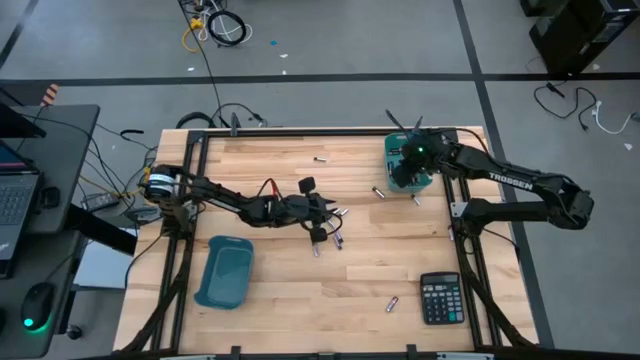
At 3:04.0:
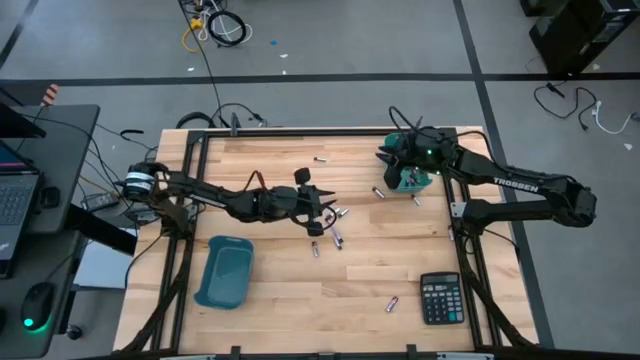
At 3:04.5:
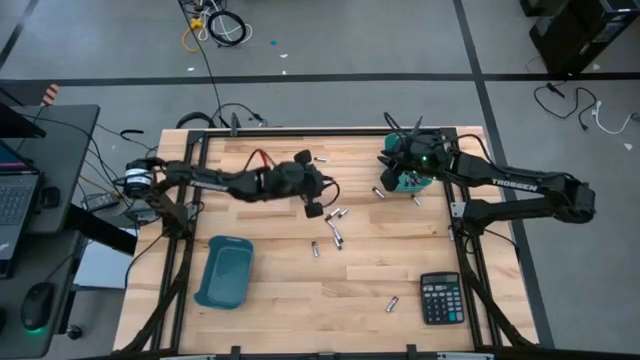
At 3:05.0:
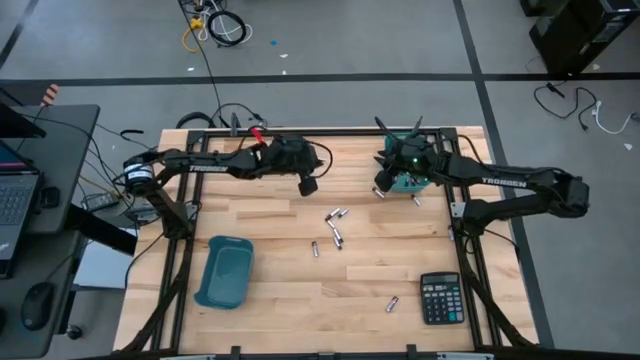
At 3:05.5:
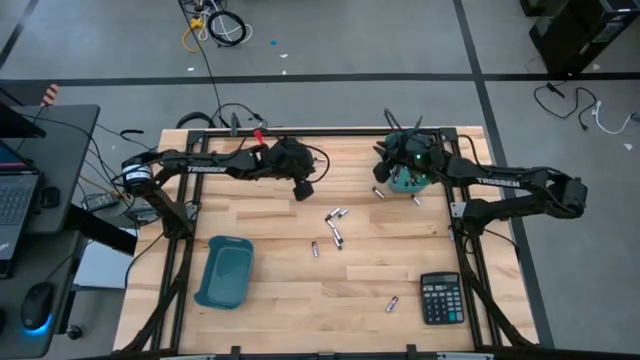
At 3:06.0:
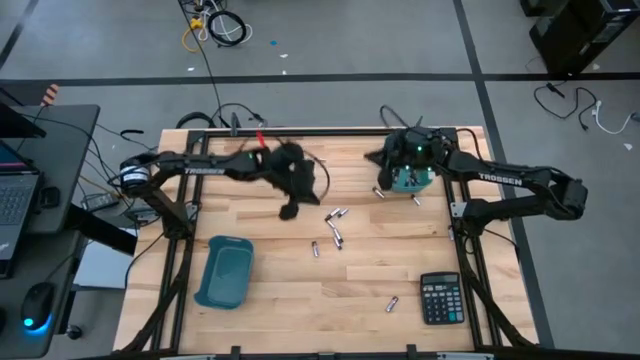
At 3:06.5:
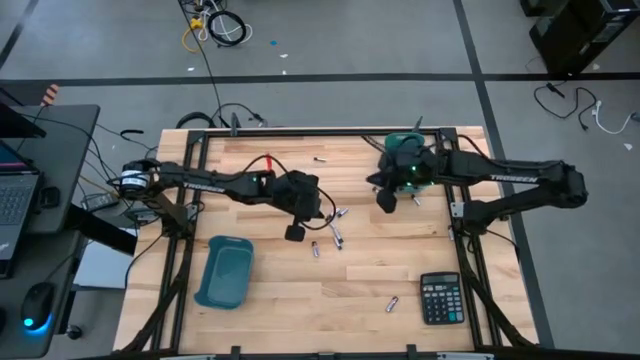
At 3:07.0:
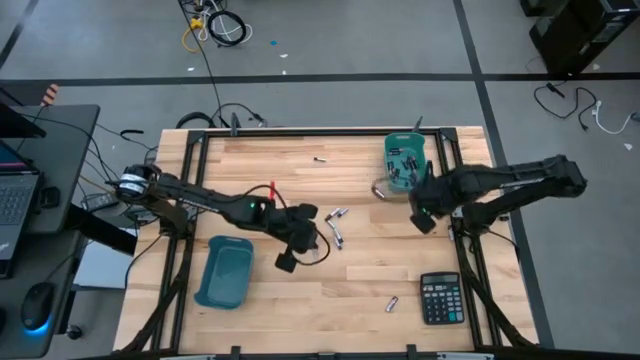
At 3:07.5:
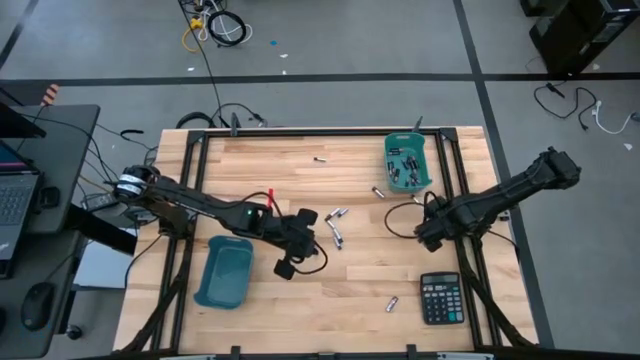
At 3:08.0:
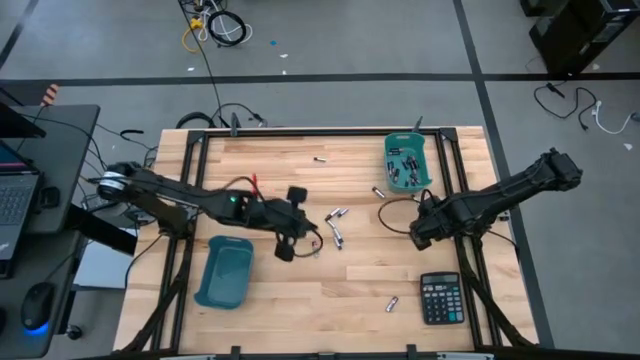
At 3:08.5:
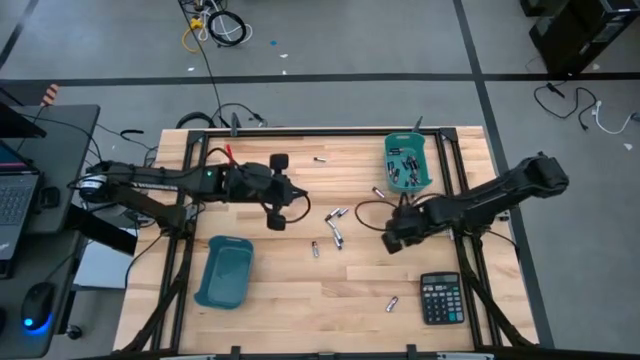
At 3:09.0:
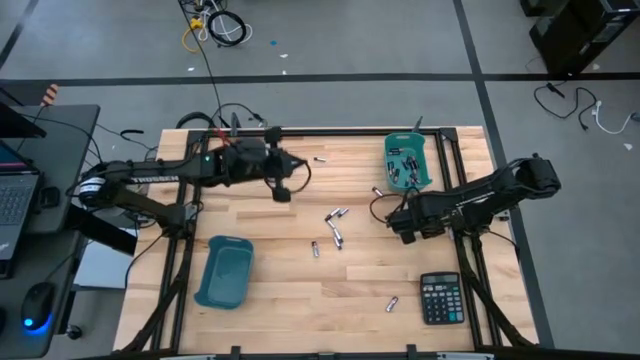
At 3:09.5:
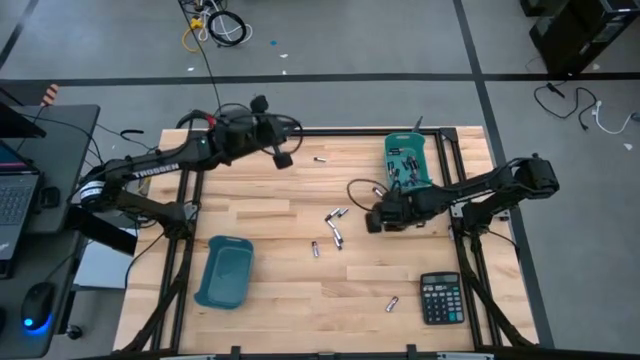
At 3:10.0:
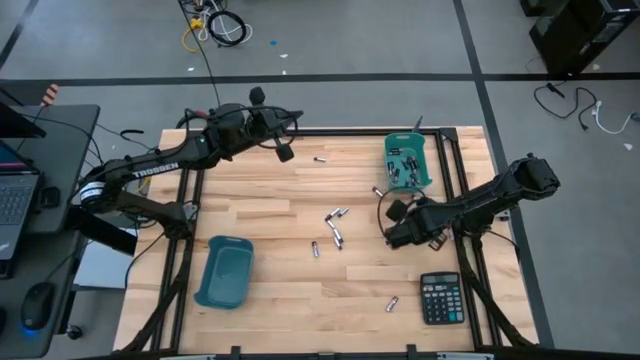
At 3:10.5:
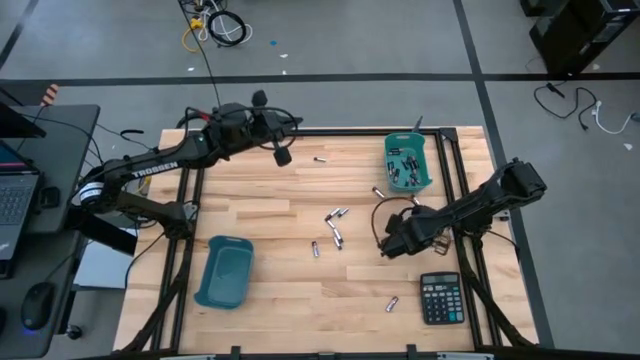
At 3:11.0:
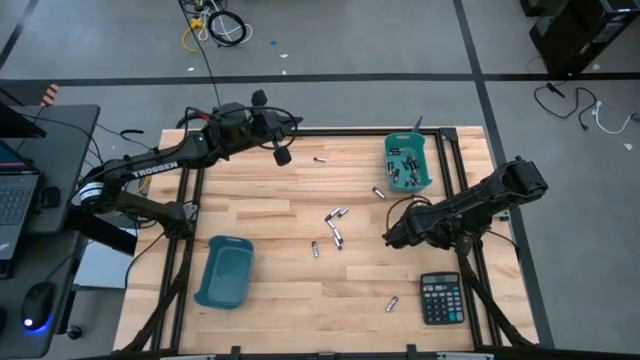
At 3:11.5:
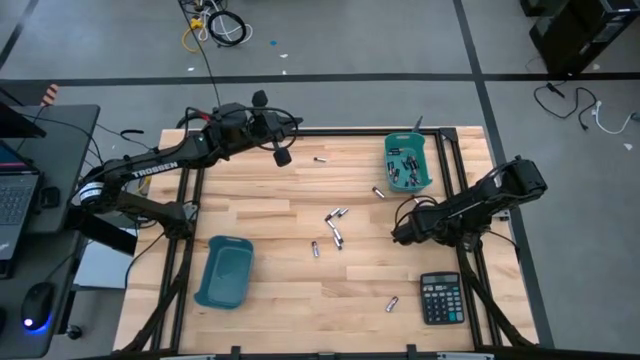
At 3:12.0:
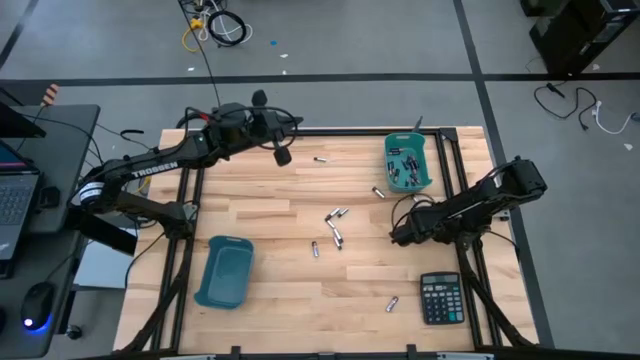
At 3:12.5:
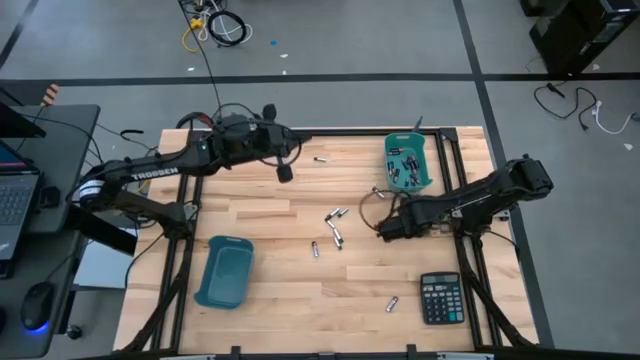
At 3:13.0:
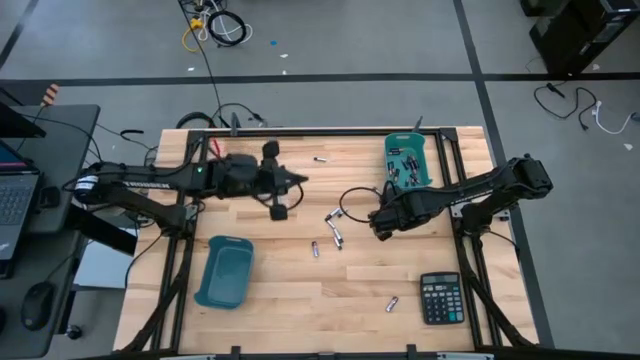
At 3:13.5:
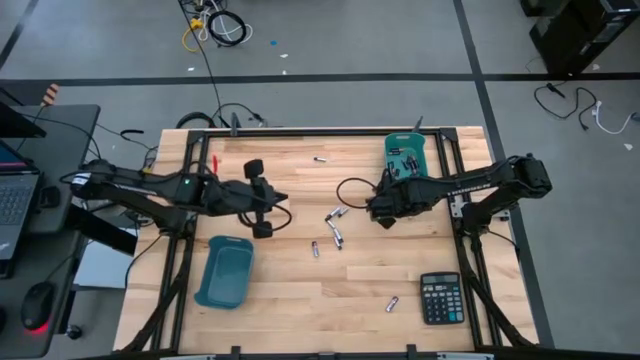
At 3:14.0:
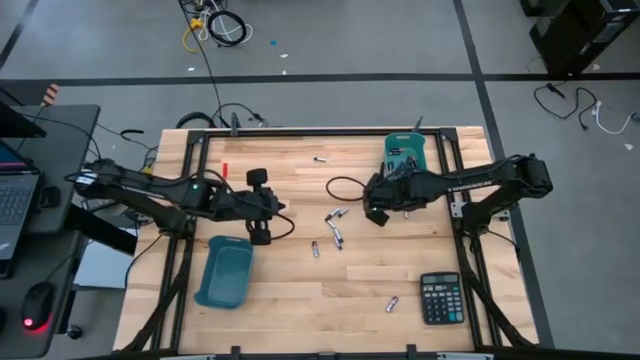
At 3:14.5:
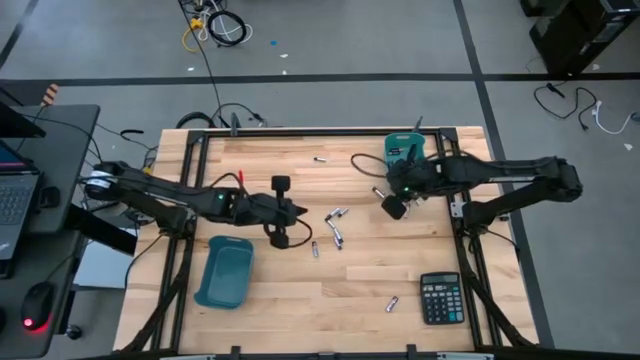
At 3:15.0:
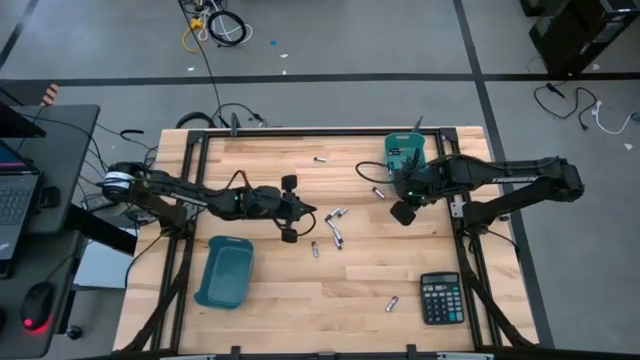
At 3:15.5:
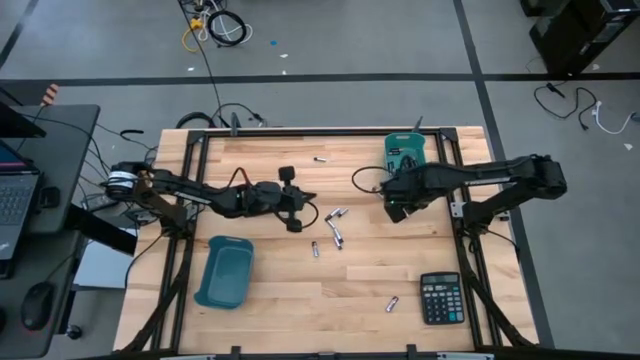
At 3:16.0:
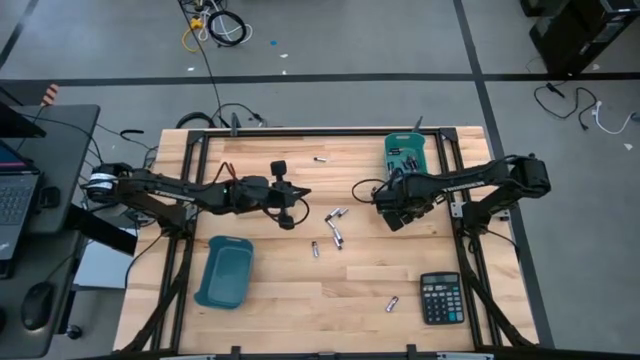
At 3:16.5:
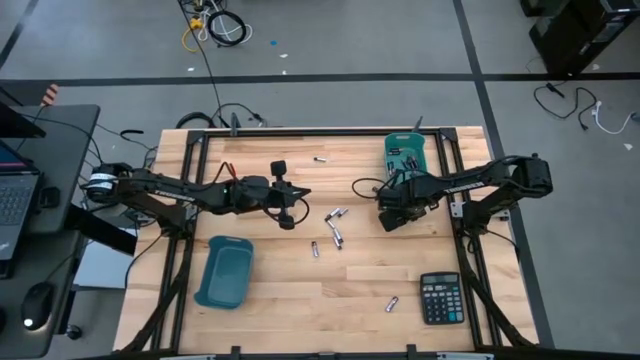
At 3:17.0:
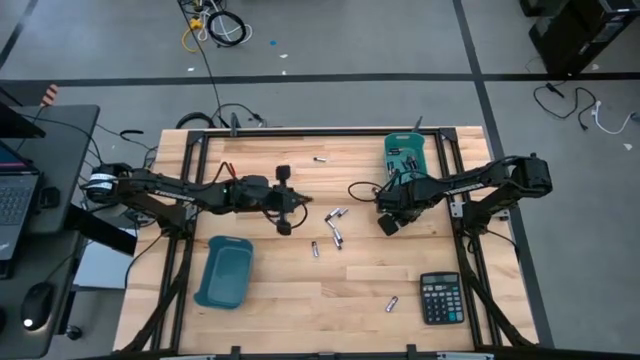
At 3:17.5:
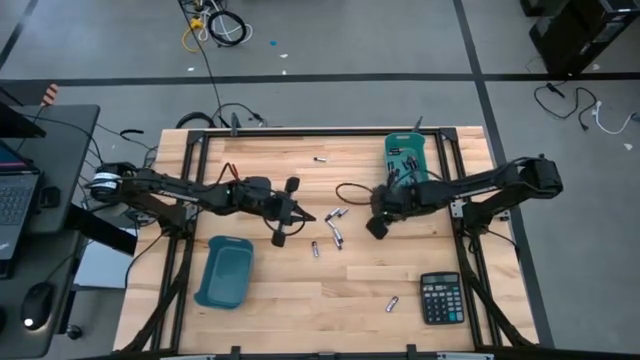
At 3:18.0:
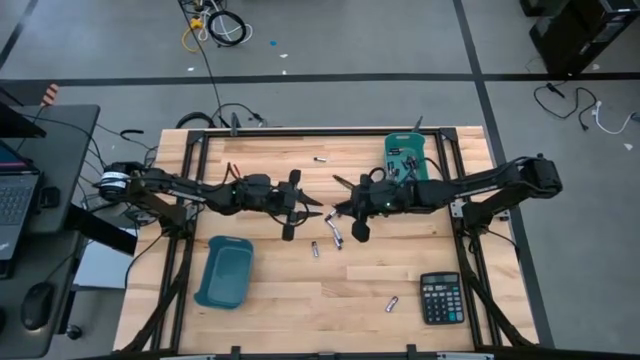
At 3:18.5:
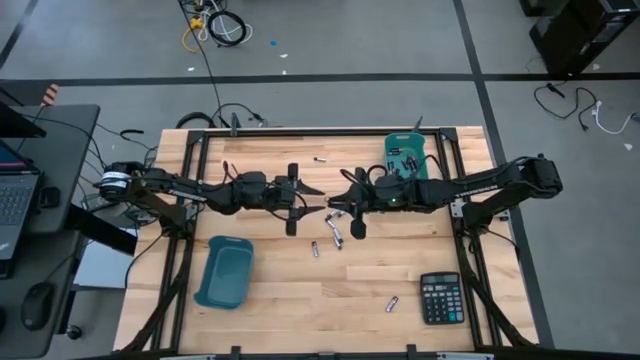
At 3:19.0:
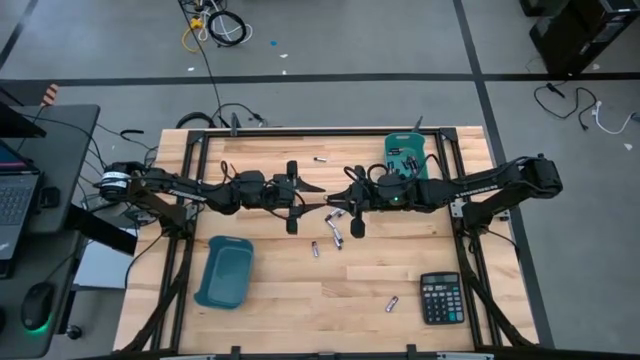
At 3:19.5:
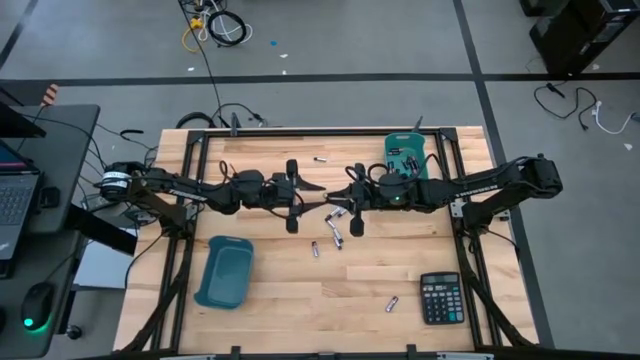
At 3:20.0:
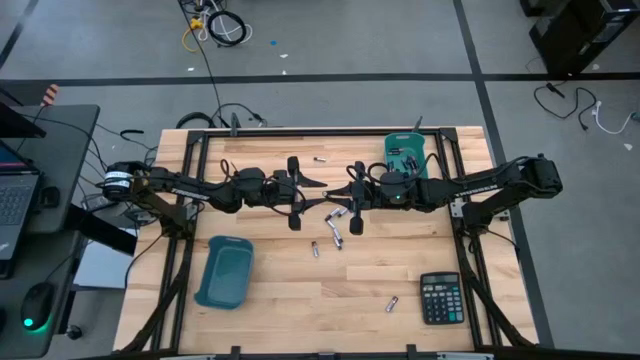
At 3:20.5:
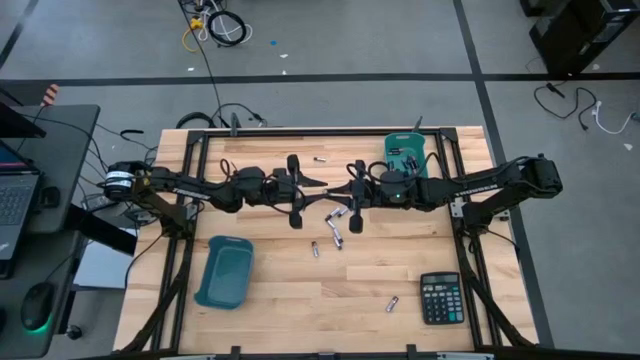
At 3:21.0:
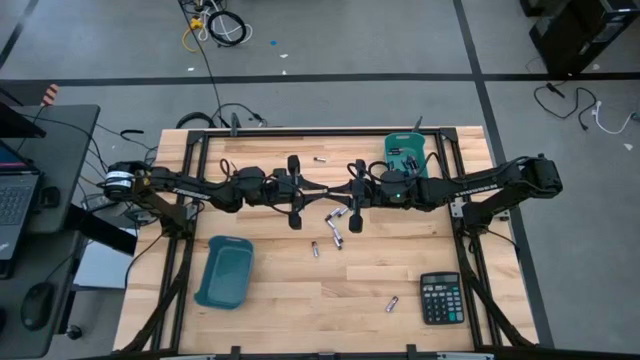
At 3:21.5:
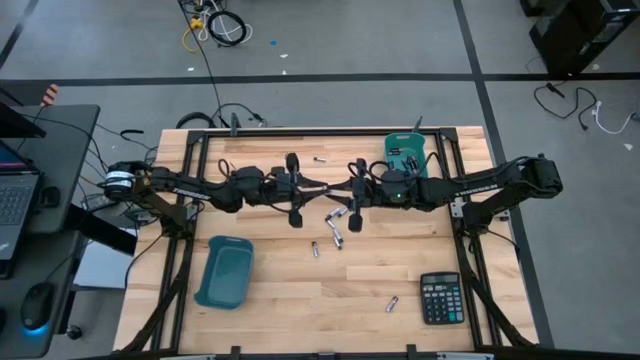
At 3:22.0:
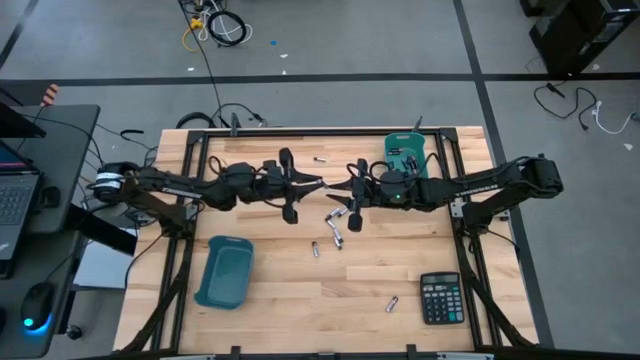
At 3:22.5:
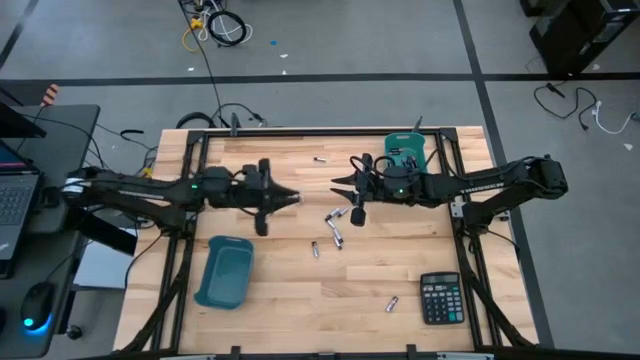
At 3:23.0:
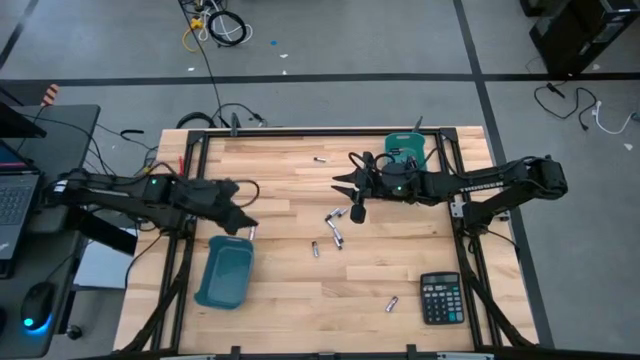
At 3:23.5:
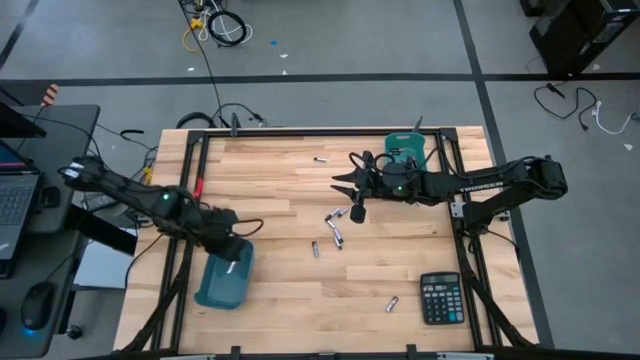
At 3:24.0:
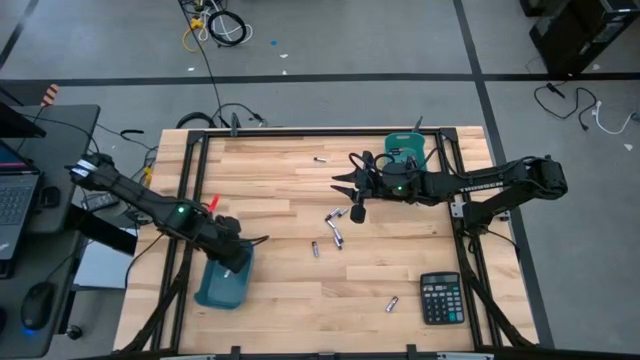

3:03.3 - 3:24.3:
Task: Sort batteries
Put the silver battery into the blue bin

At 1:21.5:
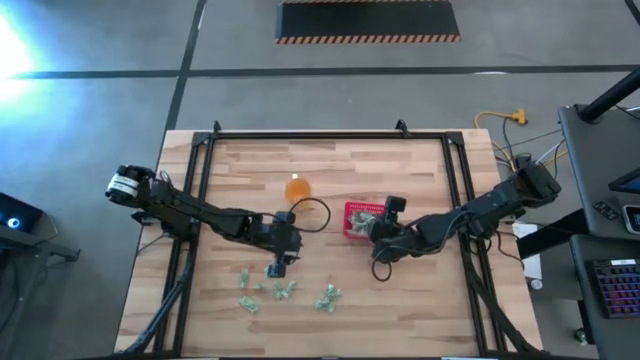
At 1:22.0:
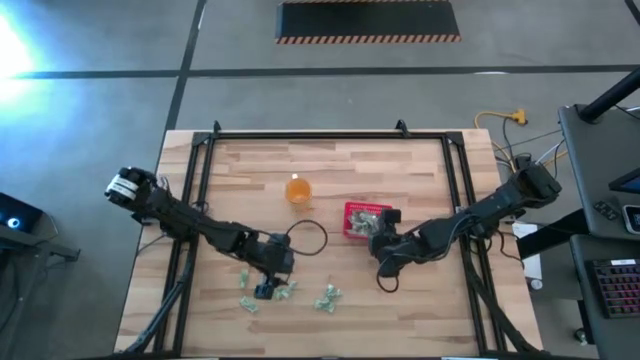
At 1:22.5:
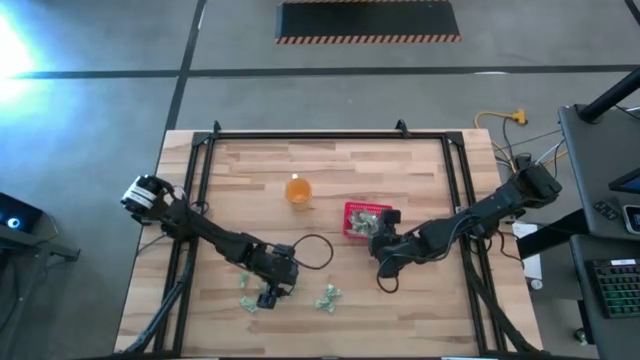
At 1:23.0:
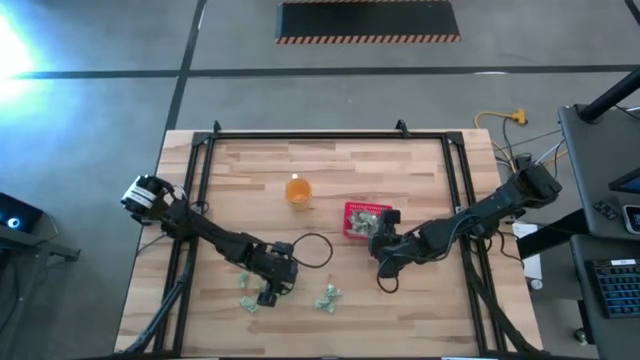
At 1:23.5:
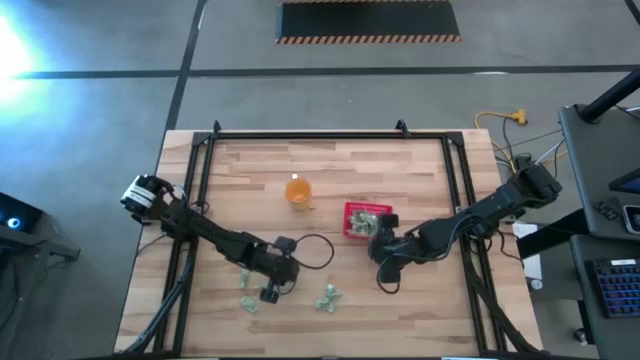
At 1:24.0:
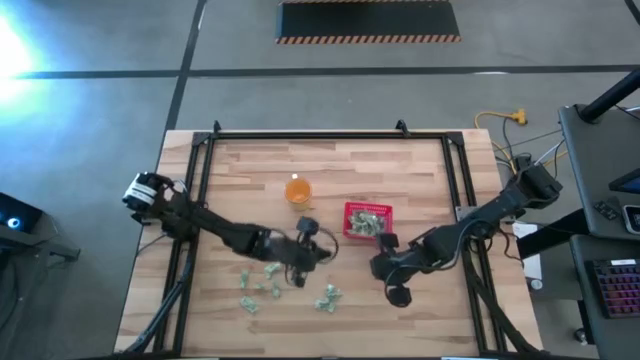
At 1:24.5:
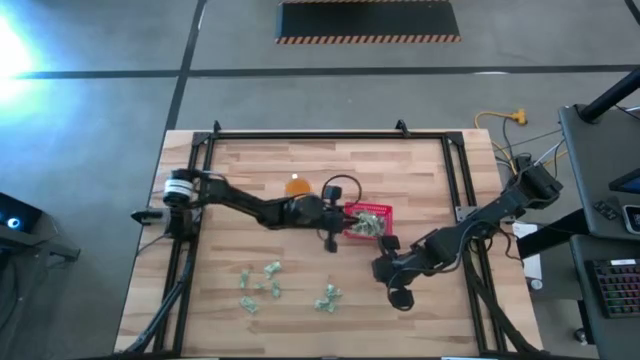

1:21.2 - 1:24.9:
Task: Pick and place Stevia / Truvia into bins
Put the stevia packet into the basket
